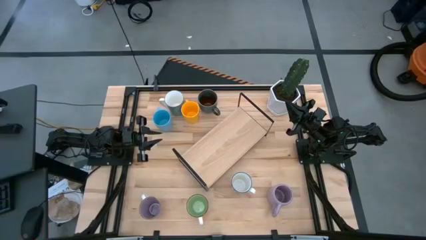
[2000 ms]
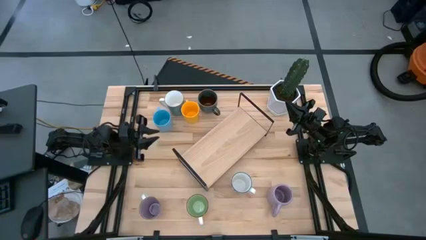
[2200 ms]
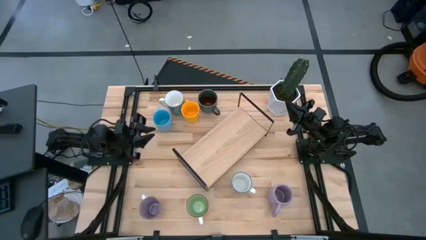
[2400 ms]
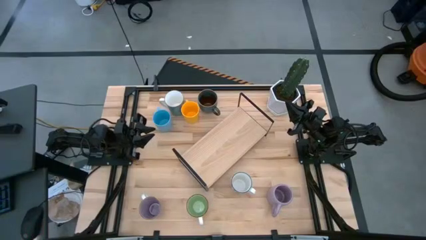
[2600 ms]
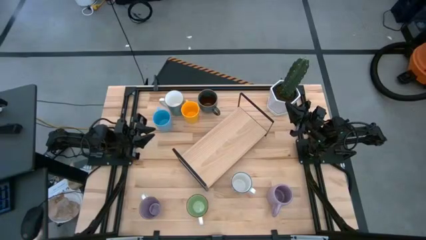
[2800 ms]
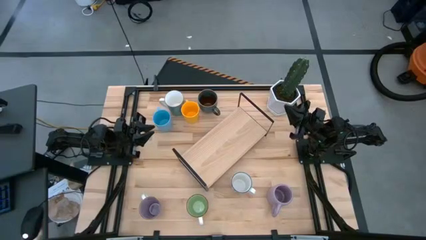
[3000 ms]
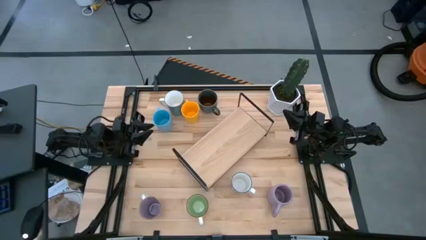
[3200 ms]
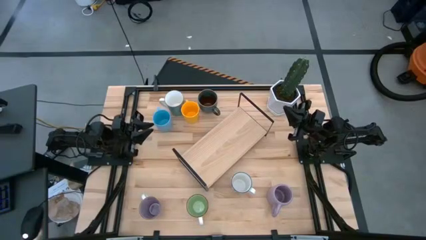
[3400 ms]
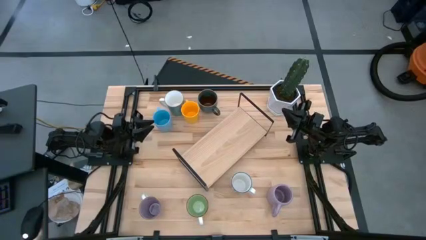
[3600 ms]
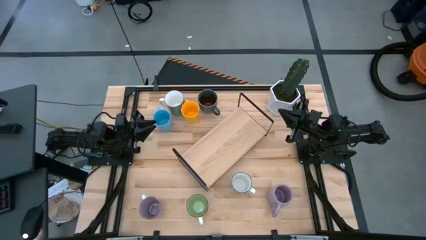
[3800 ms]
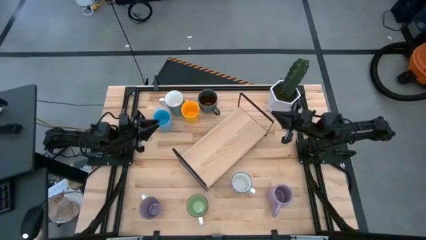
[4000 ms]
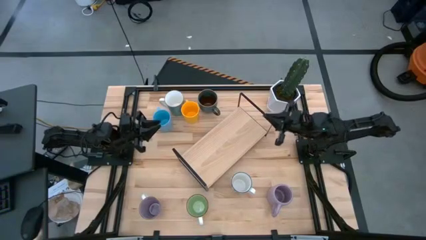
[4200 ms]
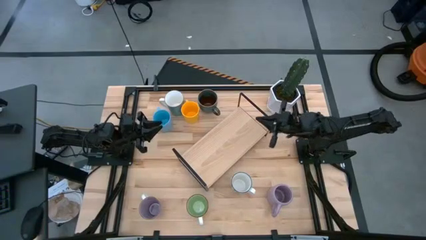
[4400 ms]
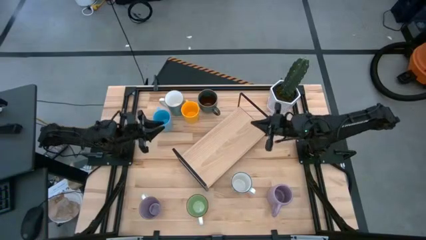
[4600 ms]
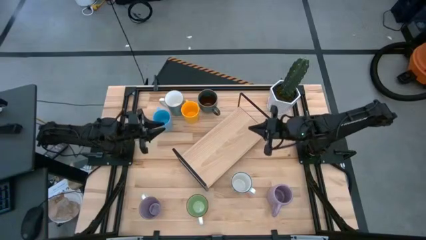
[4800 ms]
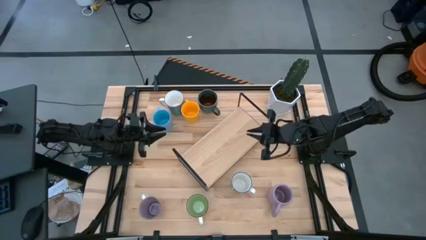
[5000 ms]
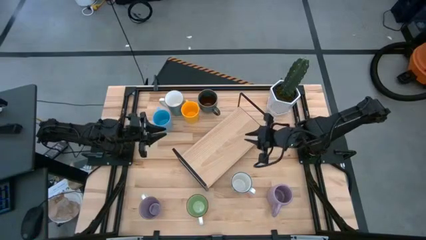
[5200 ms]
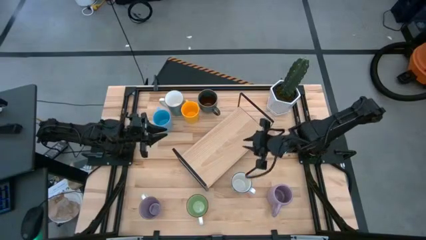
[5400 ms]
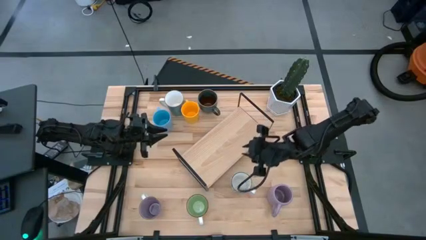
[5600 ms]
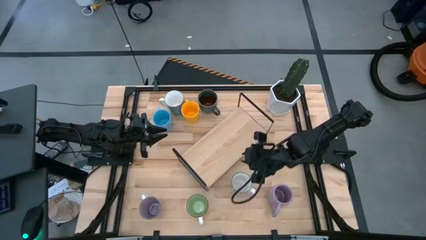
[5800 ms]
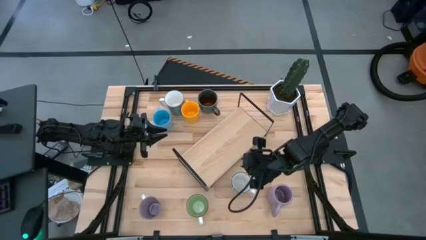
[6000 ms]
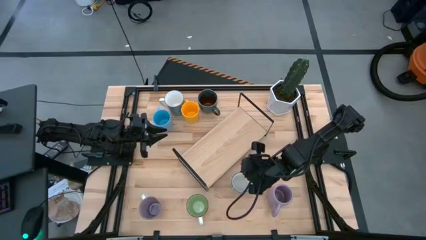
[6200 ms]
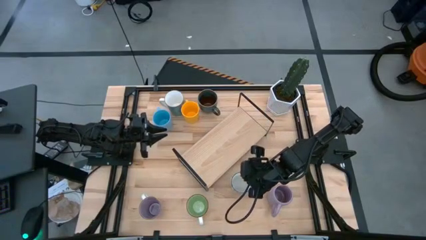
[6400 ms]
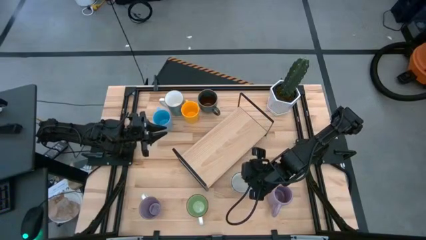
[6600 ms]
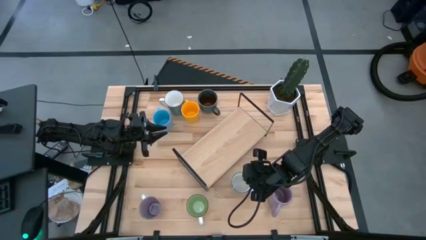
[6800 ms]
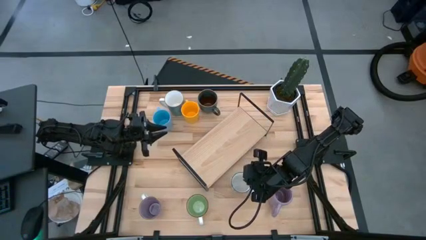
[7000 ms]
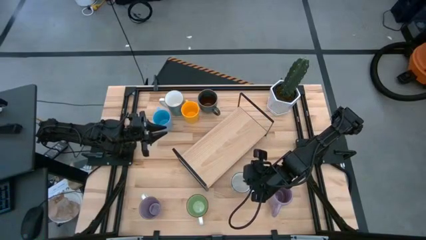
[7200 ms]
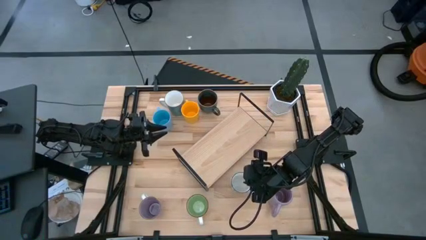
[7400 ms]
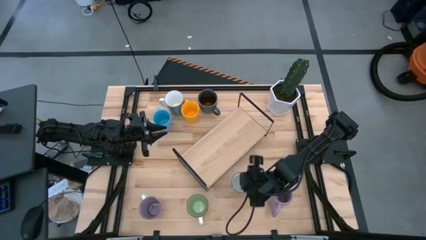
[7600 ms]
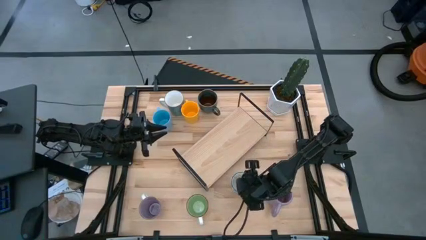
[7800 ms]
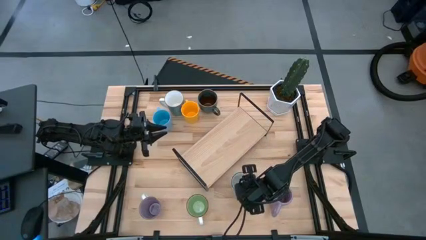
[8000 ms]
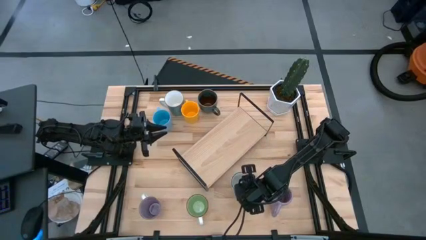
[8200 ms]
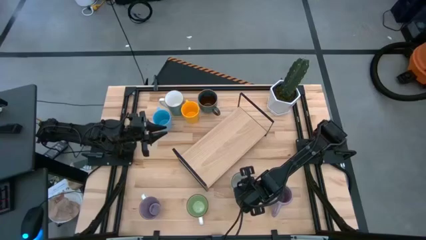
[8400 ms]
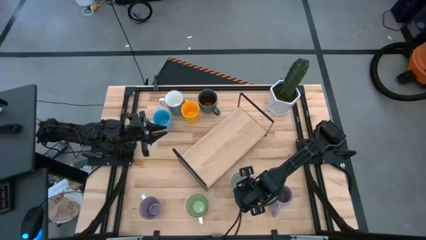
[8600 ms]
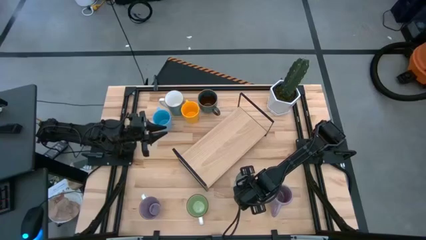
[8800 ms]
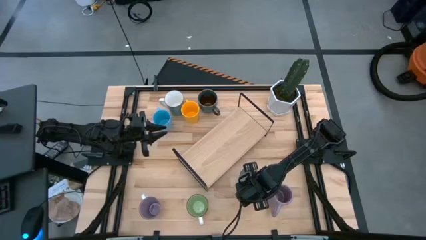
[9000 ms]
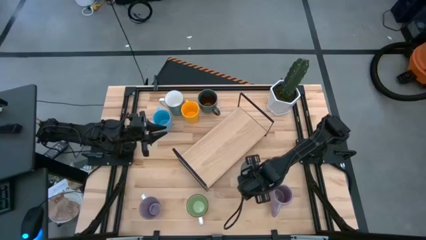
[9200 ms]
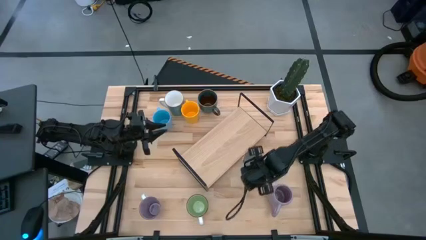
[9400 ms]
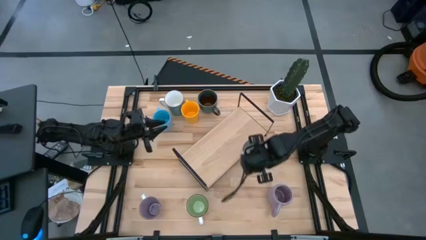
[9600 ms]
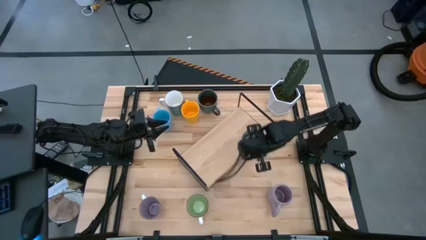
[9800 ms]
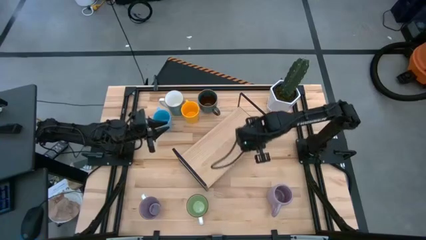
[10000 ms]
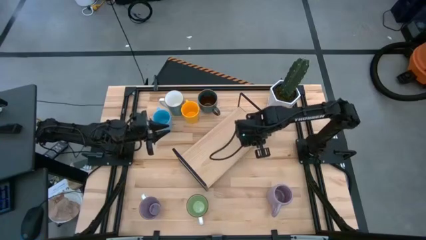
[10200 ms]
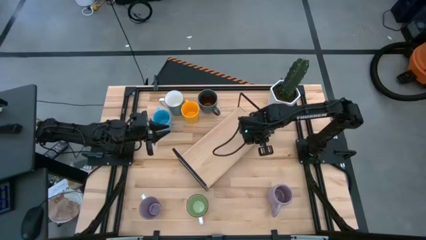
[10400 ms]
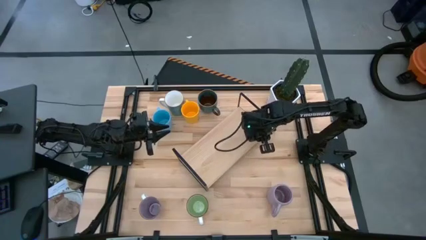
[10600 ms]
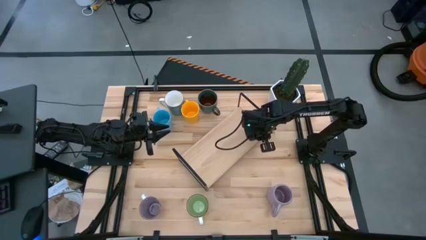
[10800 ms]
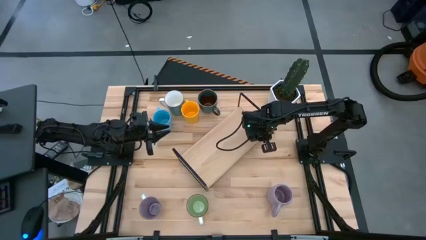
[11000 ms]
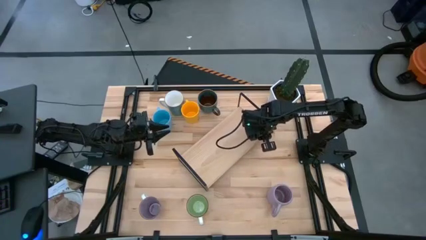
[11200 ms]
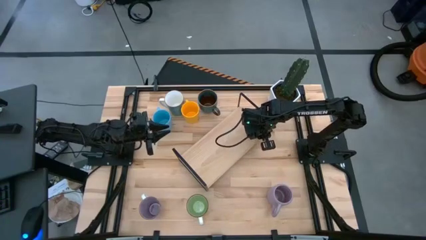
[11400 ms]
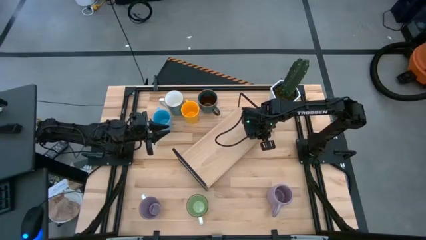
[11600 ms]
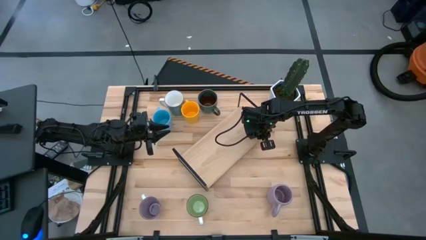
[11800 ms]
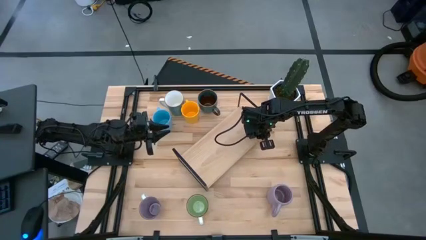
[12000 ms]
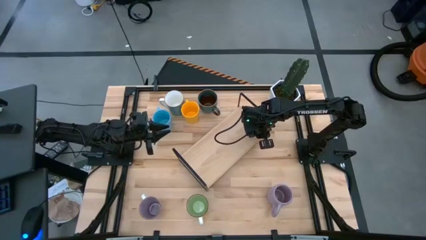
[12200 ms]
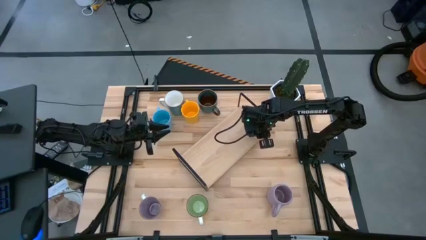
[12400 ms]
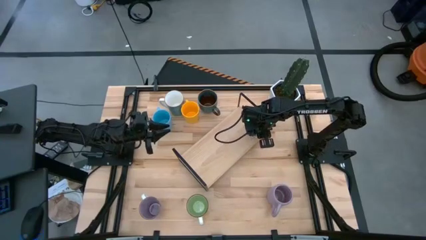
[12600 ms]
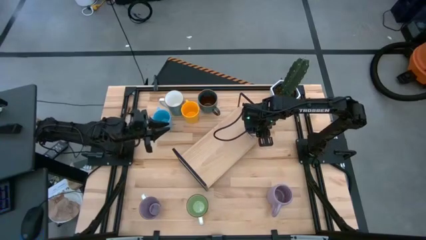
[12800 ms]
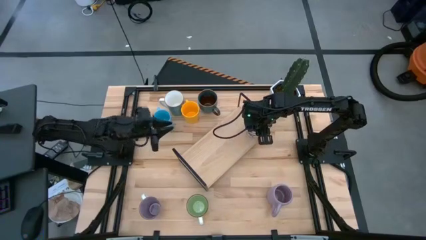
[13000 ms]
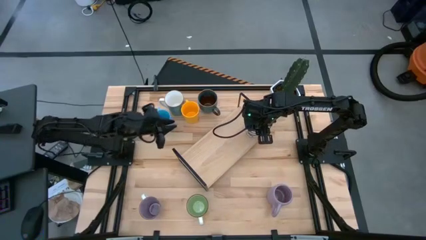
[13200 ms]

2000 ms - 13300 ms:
Task: Place coffee mugs
Put the white patterned mug on the shelf

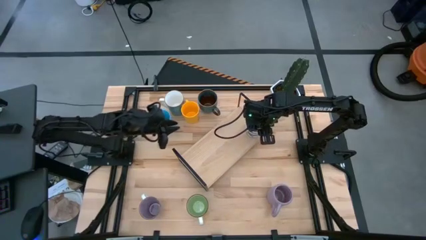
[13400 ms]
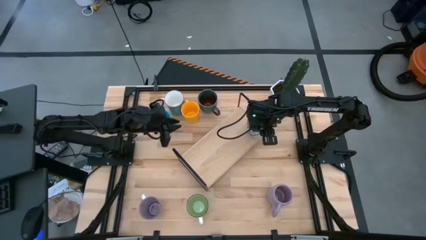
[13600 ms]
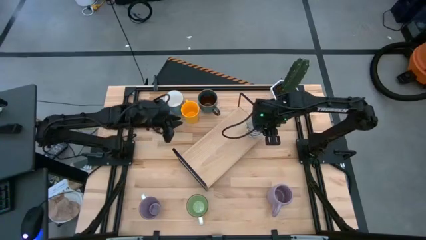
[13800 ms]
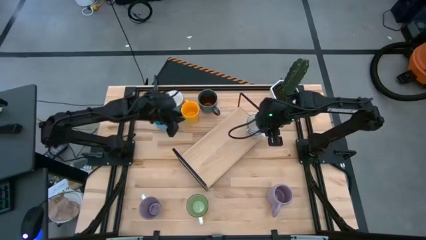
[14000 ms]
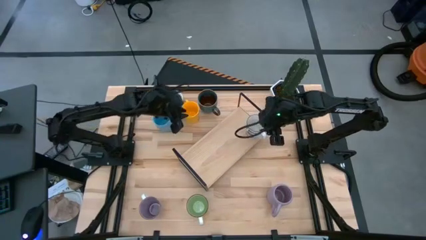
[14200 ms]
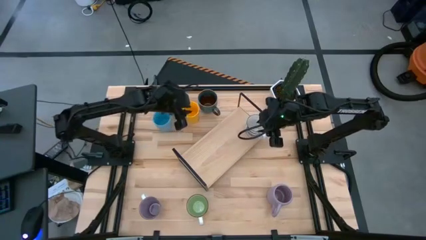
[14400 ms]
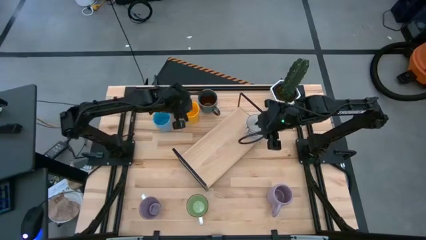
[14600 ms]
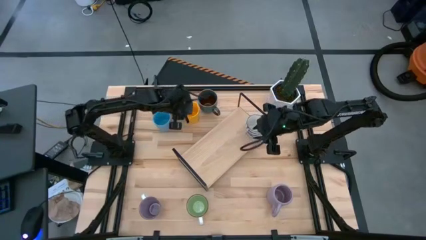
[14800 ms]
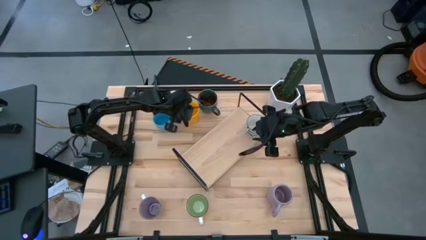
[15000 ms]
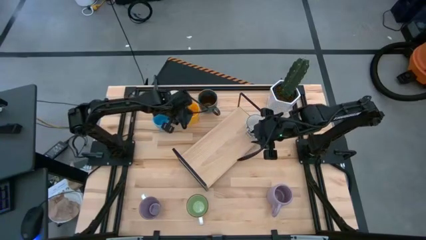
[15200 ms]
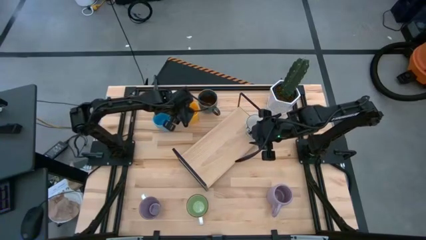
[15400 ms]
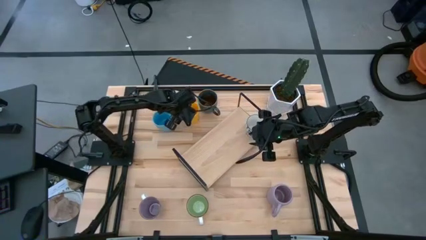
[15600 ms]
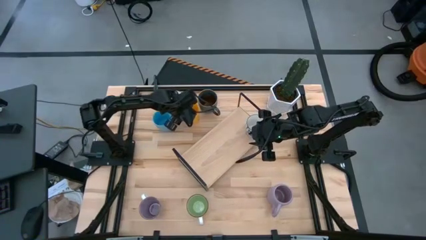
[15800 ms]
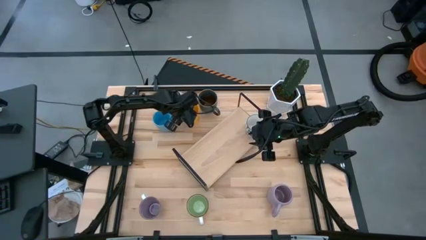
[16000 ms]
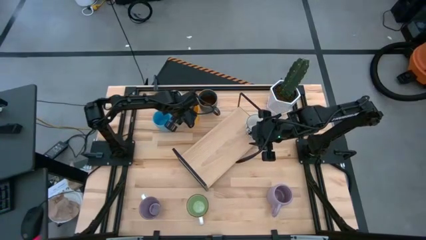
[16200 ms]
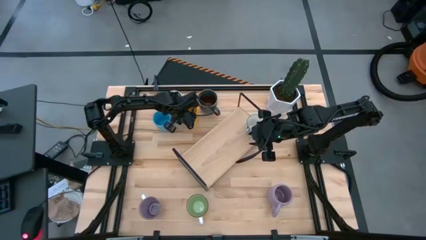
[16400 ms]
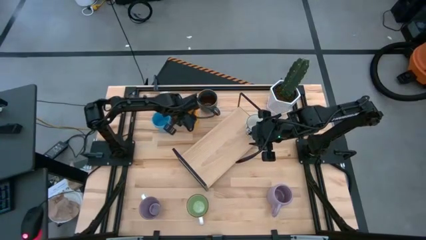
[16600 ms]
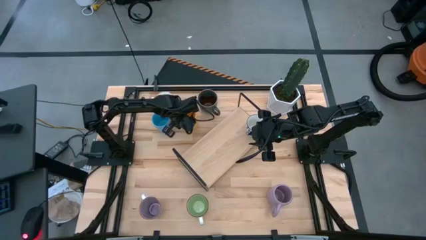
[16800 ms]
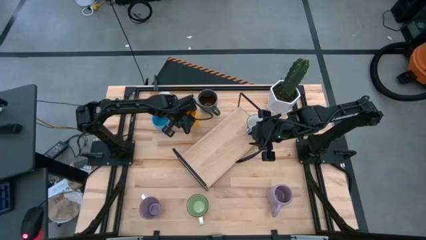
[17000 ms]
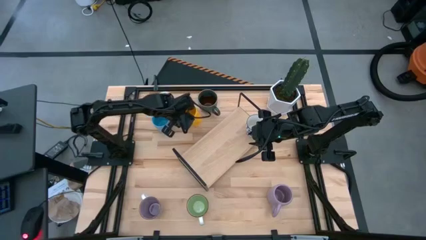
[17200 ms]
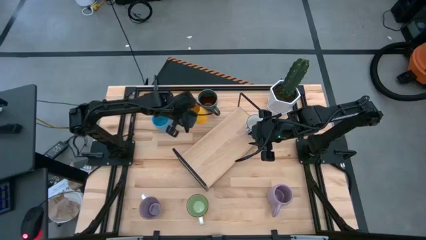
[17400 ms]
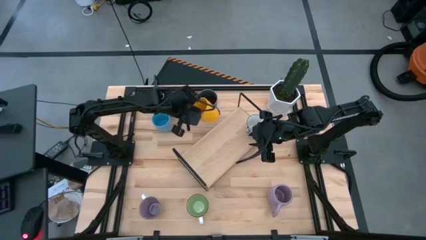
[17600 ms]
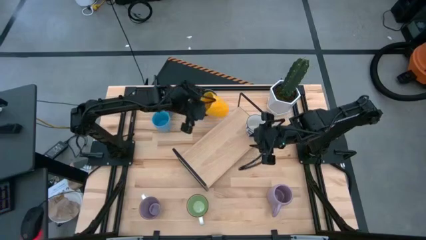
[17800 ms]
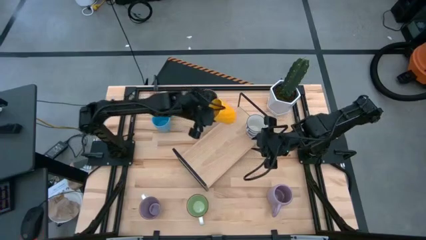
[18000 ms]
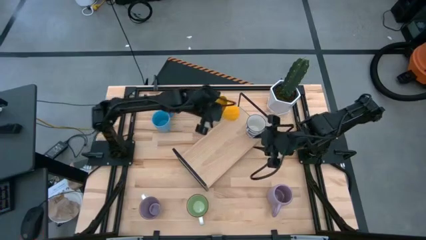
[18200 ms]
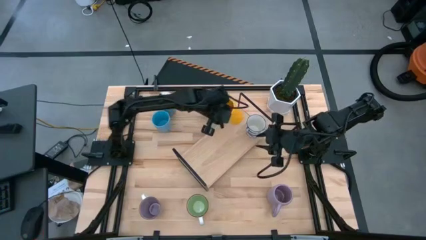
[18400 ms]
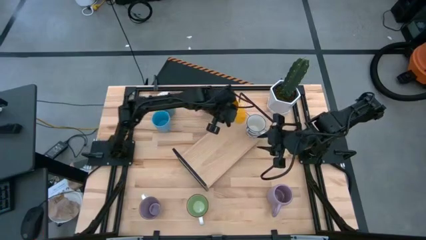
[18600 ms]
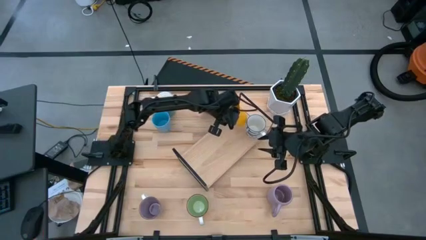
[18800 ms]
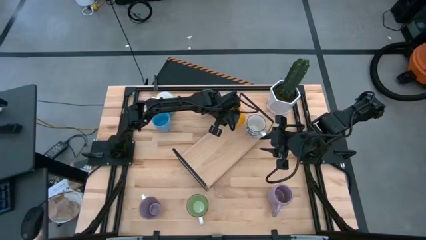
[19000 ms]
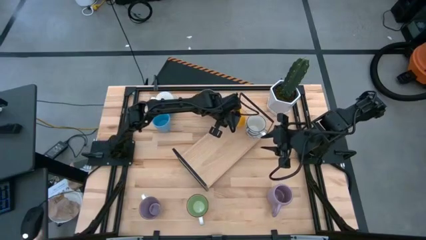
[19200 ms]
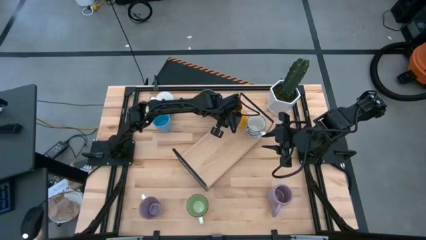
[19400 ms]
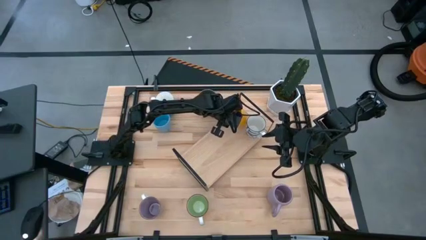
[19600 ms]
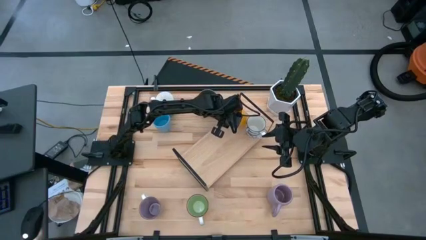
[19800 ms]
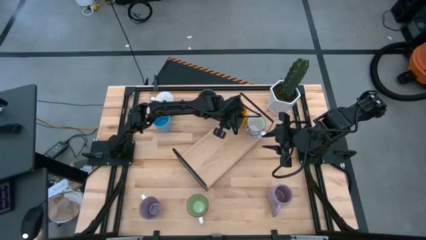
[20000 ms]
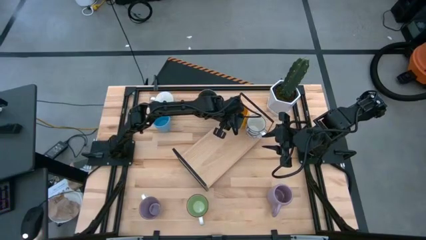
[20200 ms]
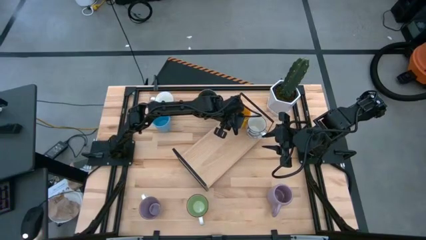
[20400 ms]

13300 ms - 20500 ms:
Put the yellow mug on the shelf
